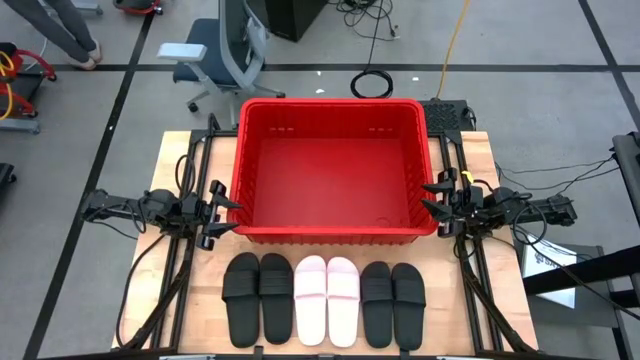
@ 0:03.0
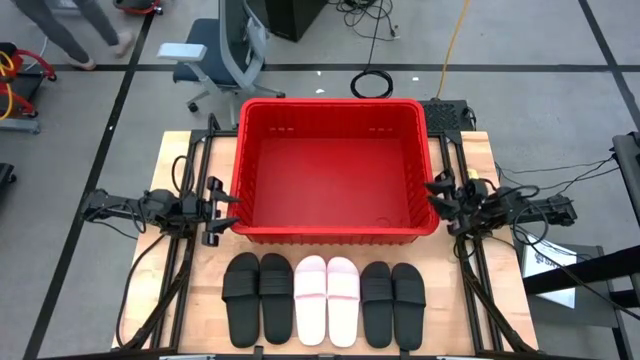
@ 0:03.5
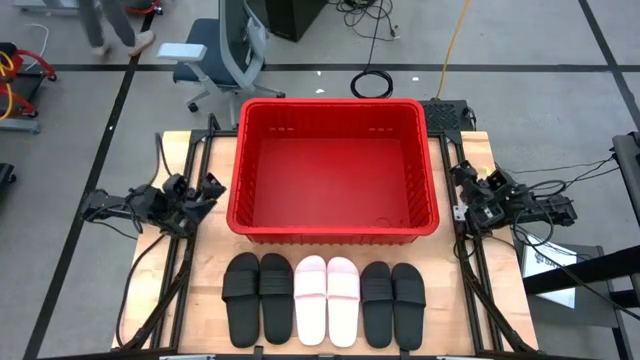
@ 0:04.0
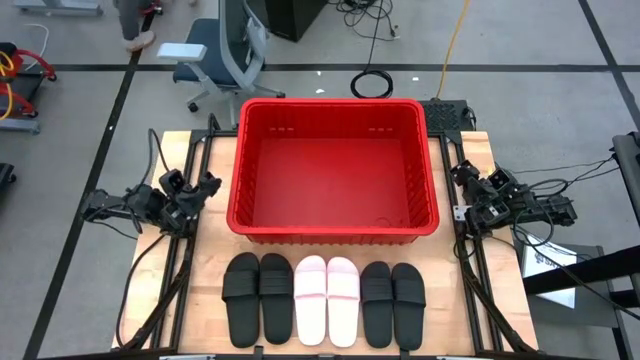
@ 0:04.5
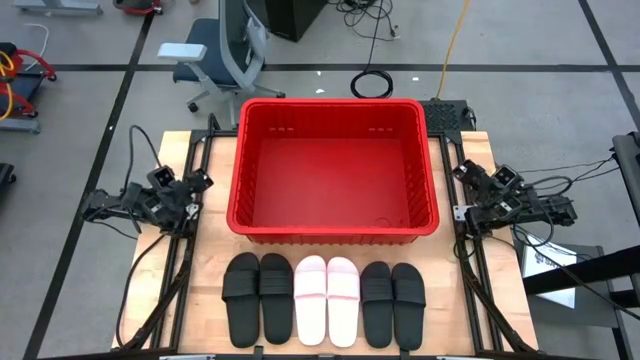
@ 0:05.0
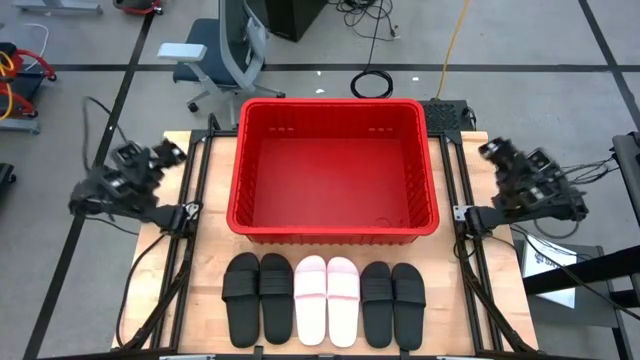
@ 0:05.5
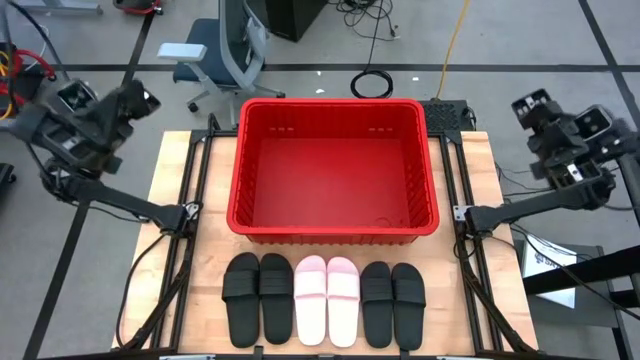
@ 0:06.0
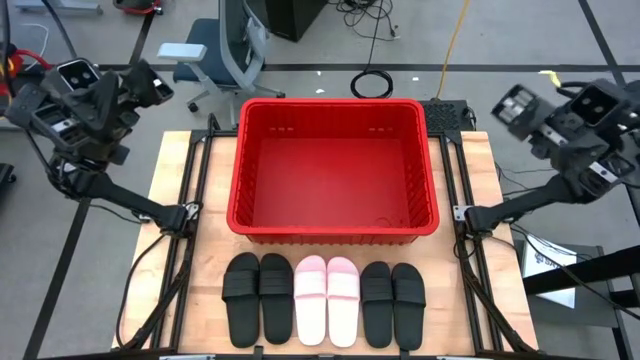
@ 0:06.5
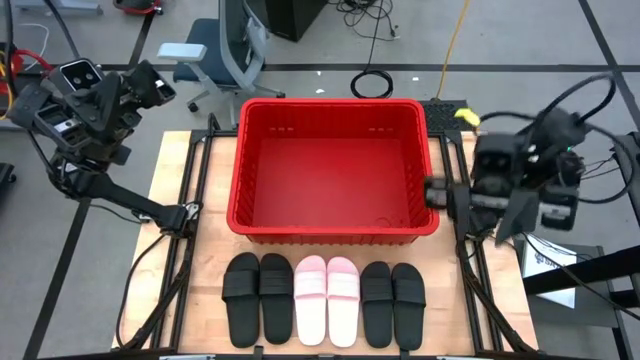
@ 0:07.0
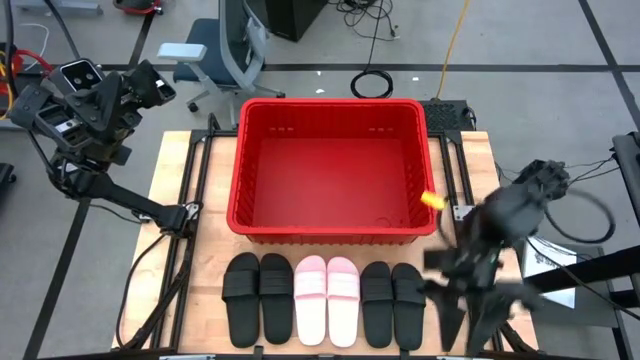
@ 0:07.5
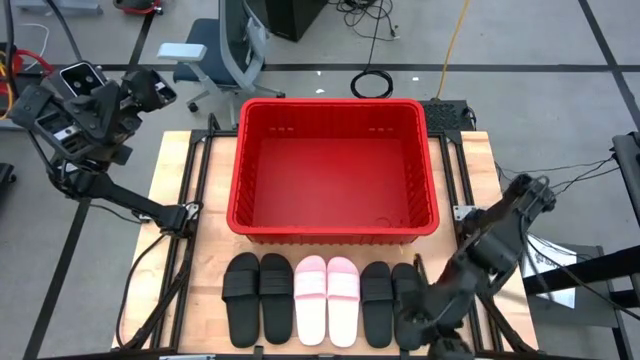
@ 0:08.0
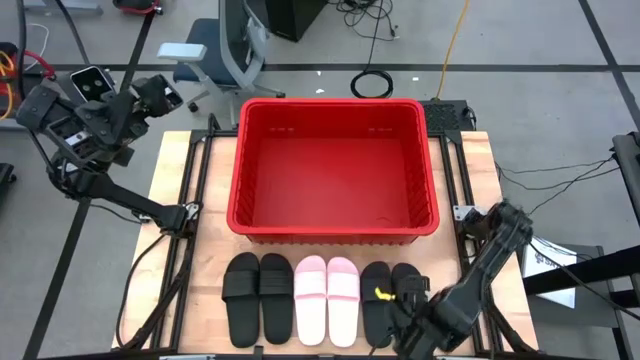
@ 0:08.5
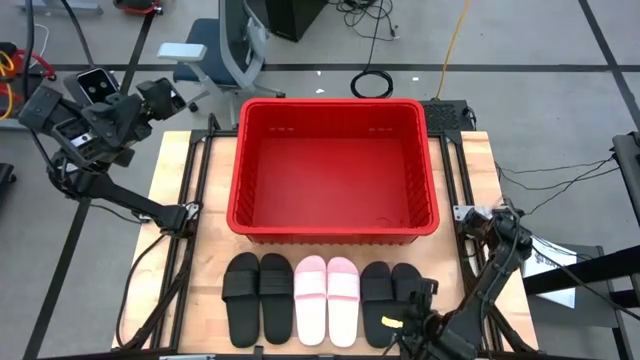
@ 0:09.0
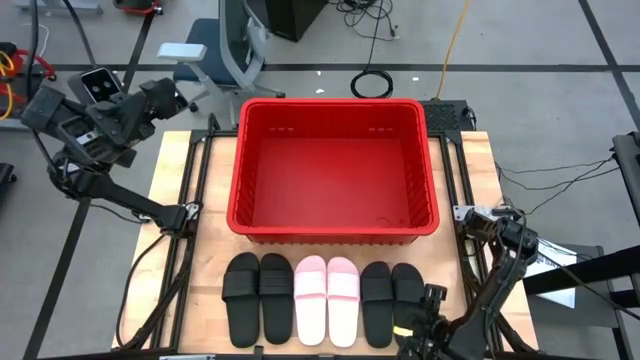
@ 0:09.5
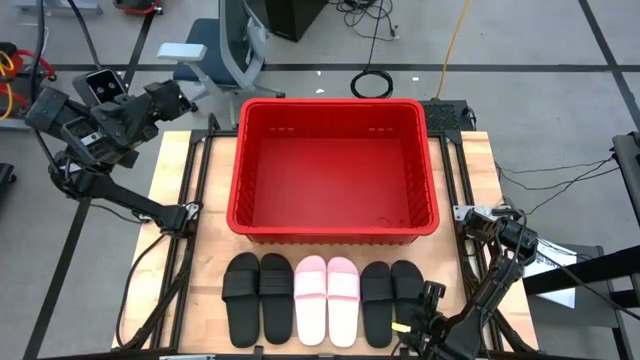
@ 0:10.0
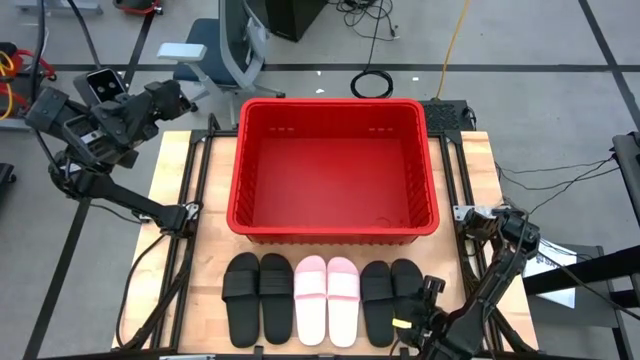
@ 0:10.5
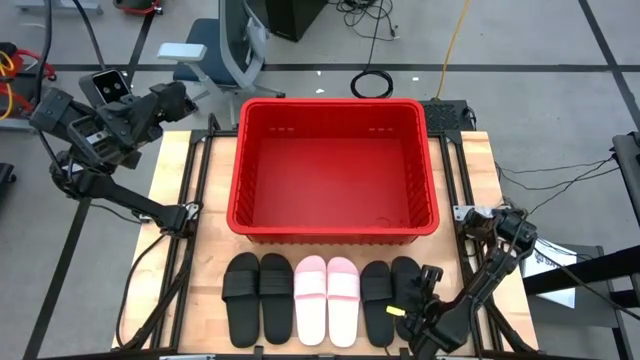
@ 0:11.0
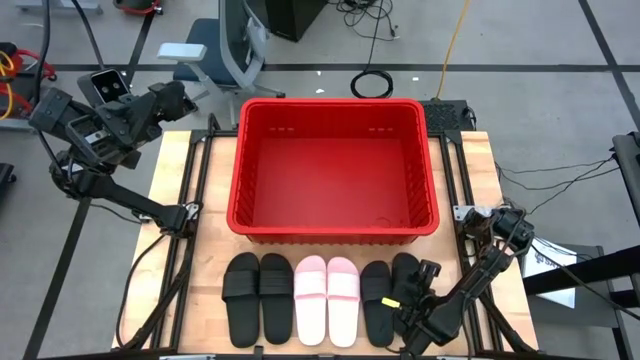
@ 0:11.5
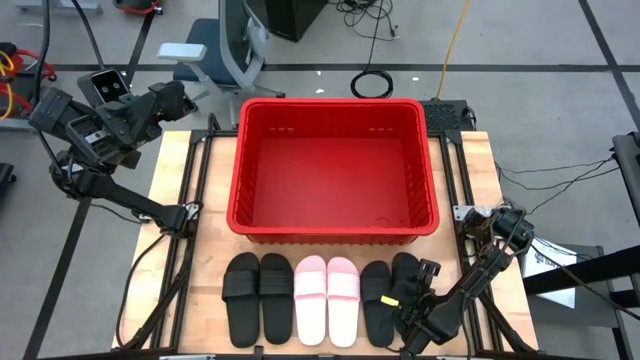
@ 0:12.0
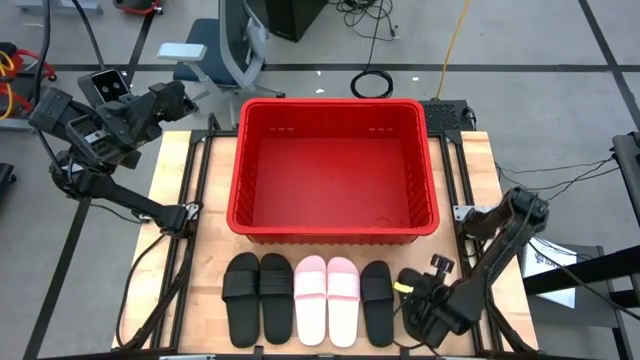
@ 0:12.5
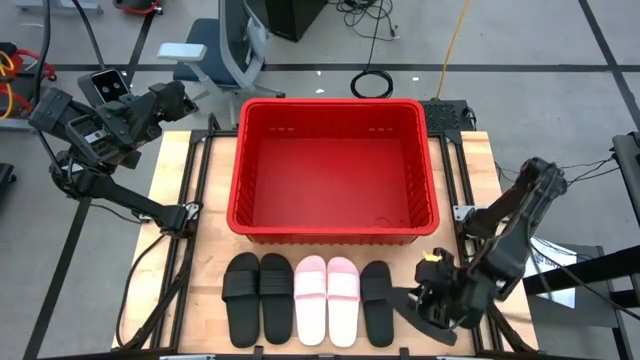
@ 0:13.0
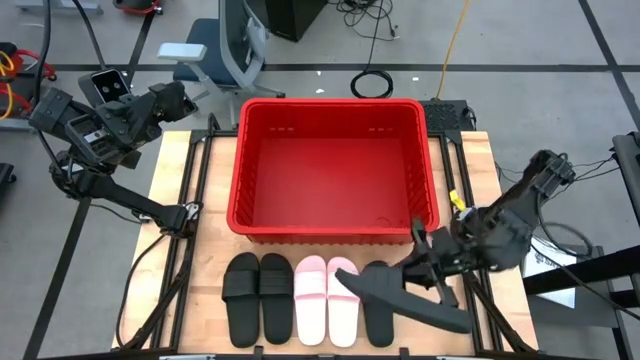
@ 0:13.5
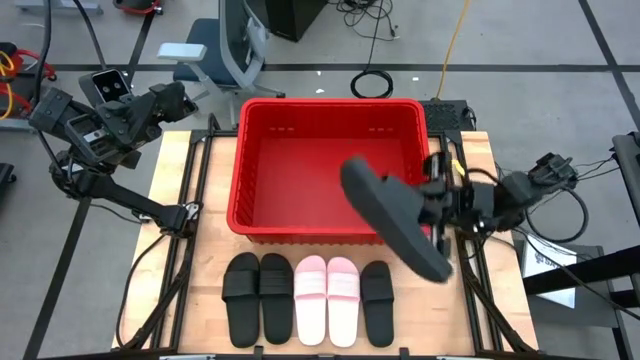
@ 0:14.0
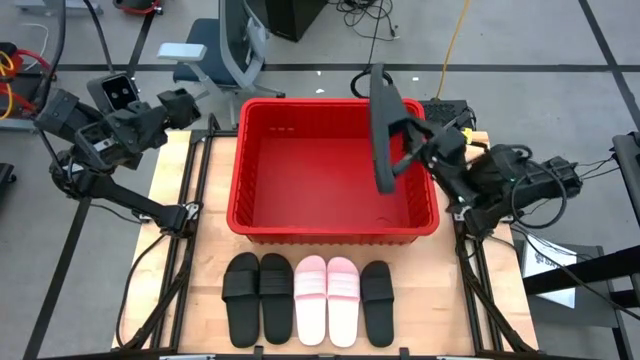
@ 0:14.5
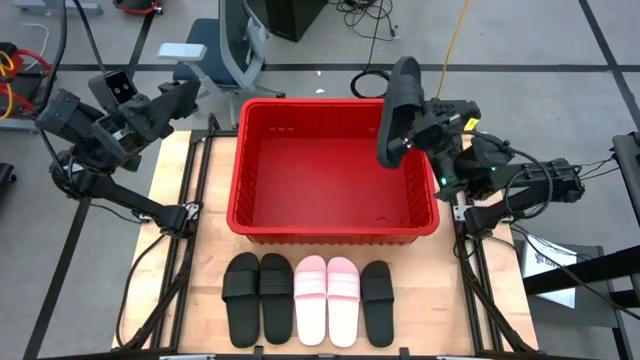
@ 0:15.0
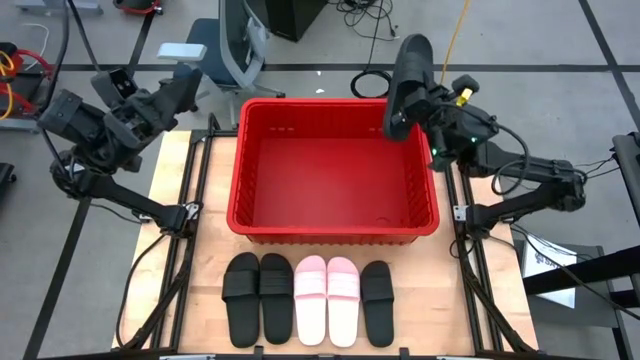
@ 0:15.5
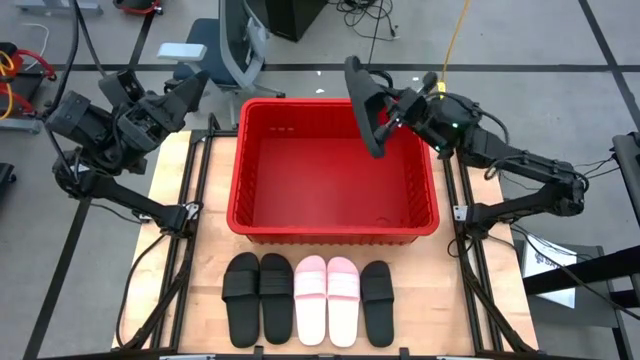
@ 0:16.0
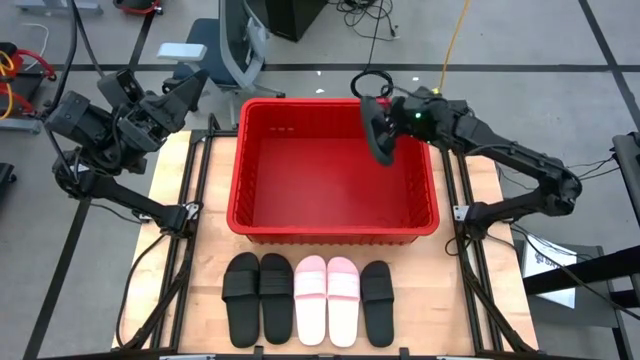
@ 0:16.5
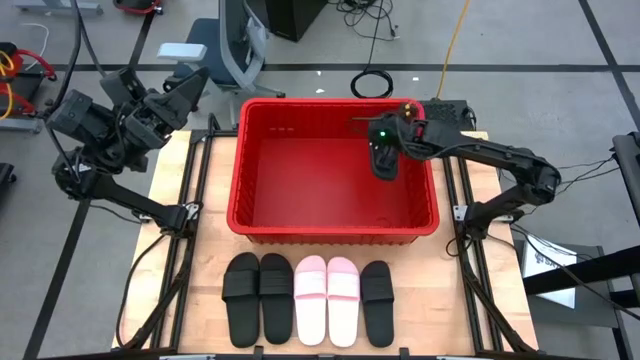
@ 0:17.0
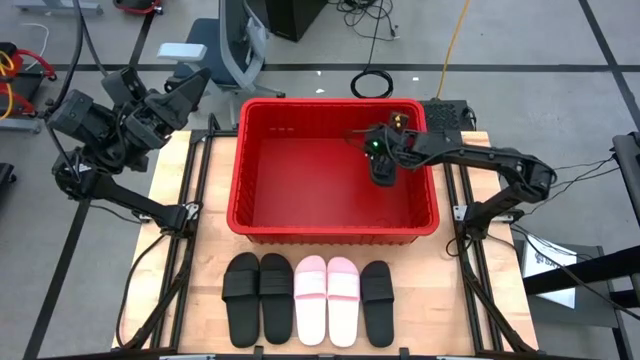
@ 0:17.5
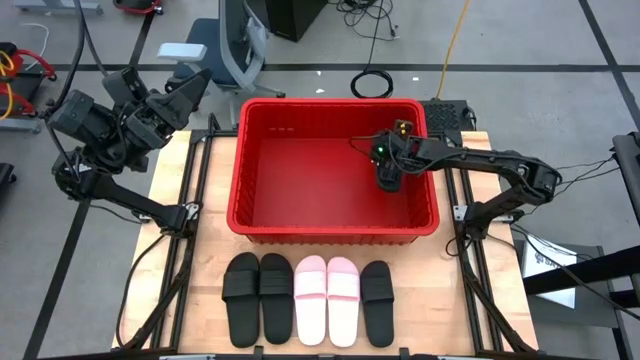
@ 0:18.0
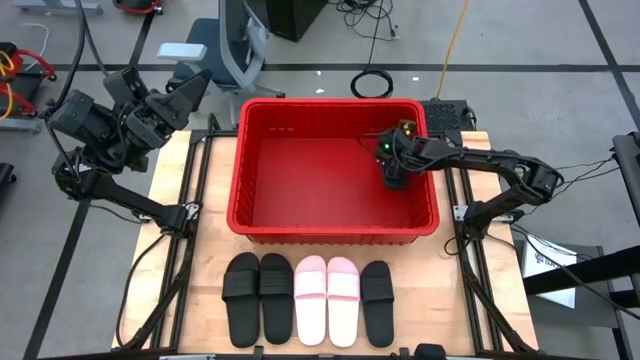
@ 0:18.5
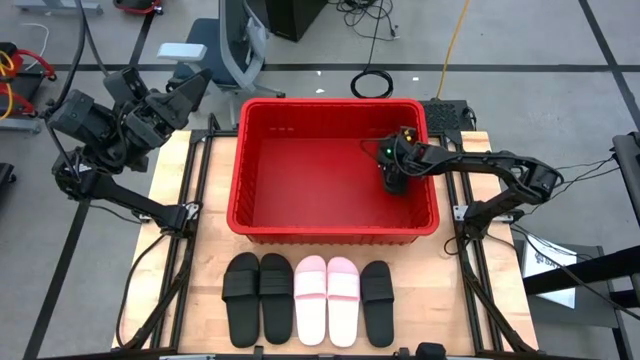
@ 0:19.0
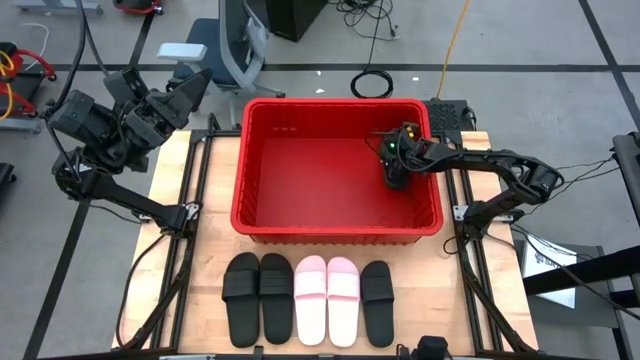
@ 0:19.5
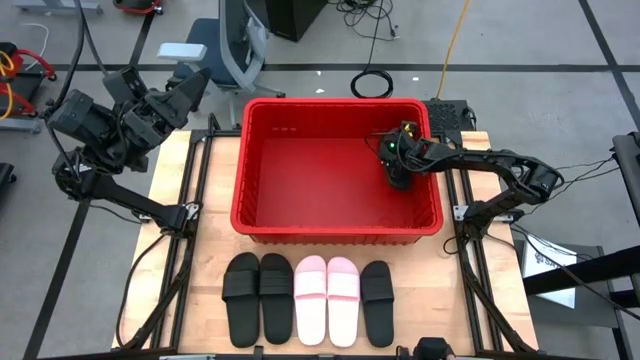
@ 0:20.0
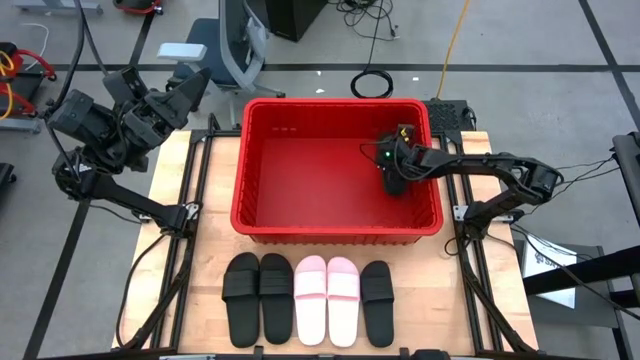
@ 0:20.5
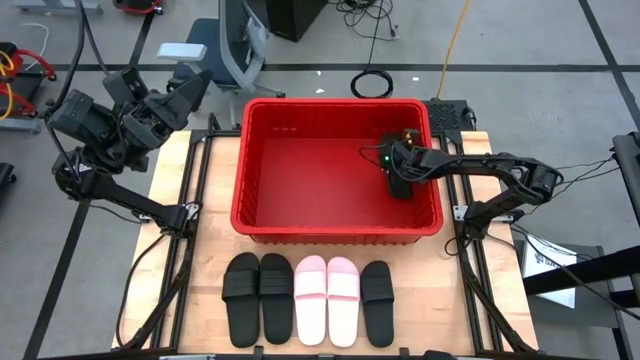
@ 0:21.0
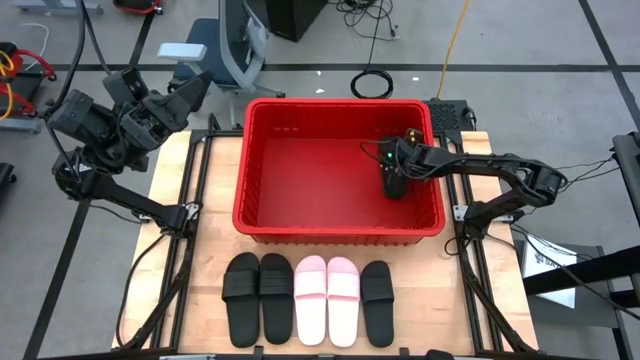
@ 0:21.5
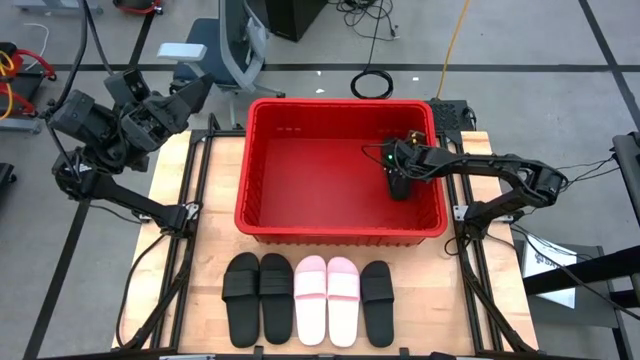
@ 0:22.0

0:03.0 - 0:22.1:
Task: Pick and place slides into bin
Put the black slide into the red bin

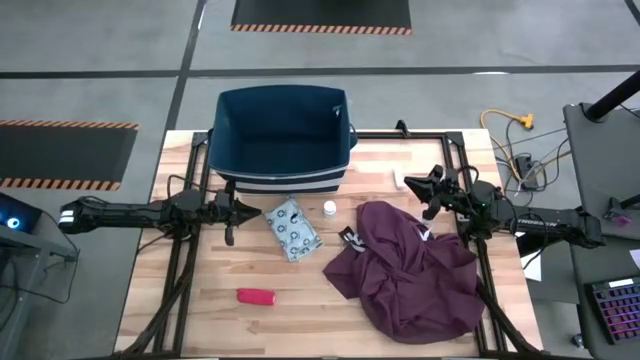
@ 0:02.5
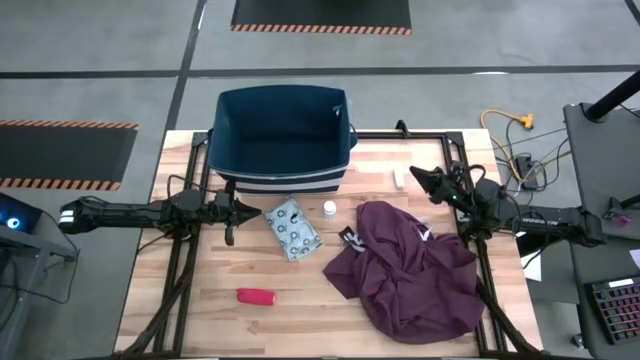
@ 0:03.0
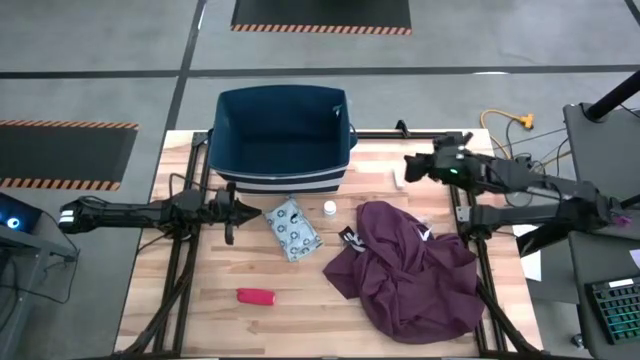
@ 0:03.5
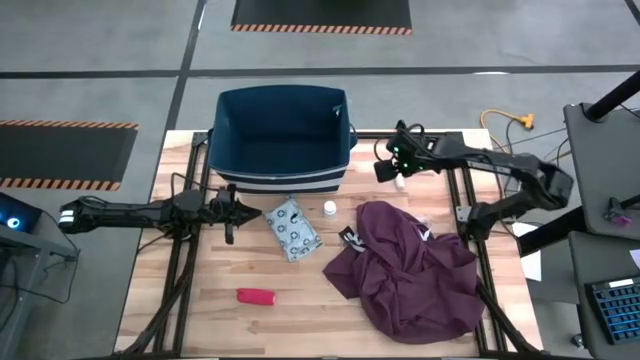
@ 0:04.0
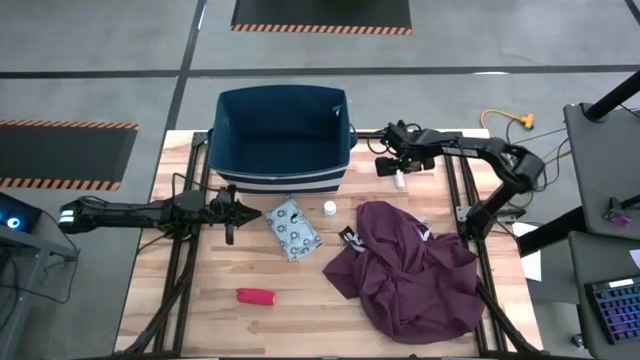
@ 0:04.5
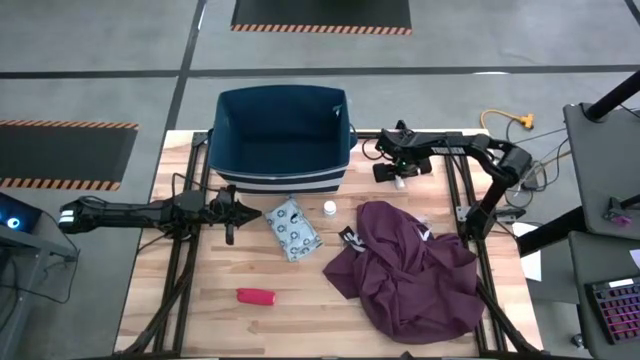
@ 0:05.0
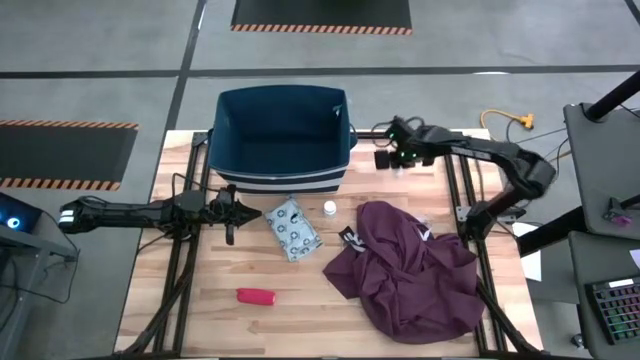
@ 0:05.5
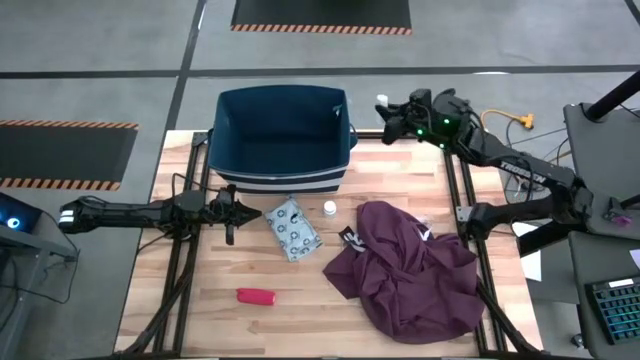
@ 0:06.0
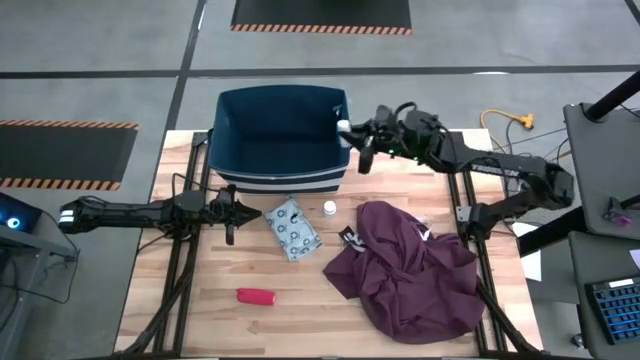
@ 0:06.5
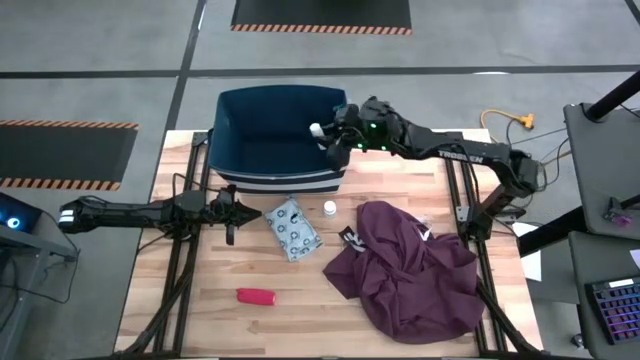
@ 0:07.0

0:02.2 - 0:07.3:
Task: Pick & place medical supplies in basket/bin
Put the rolled gauze into the bin
